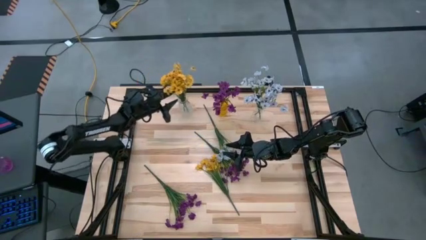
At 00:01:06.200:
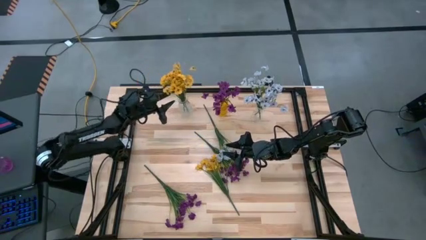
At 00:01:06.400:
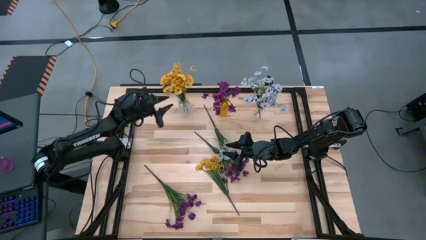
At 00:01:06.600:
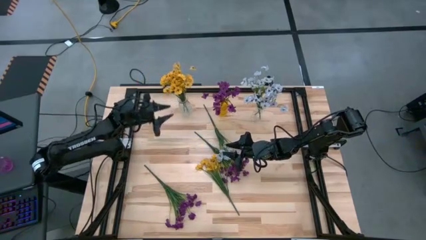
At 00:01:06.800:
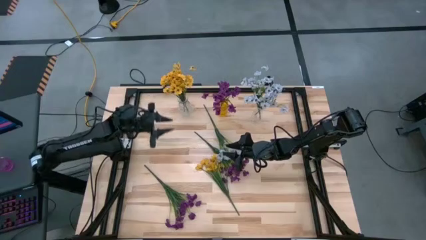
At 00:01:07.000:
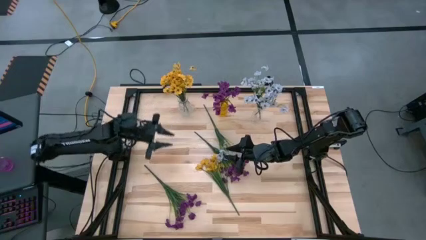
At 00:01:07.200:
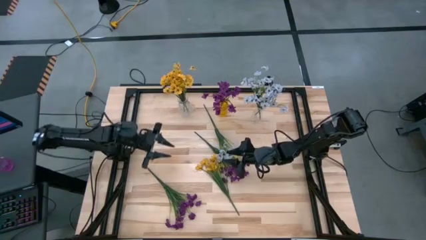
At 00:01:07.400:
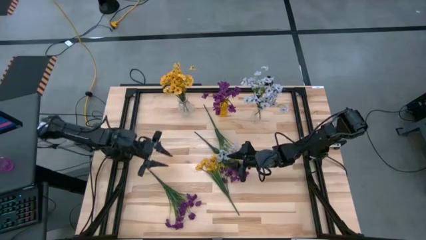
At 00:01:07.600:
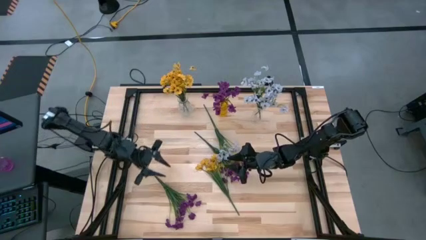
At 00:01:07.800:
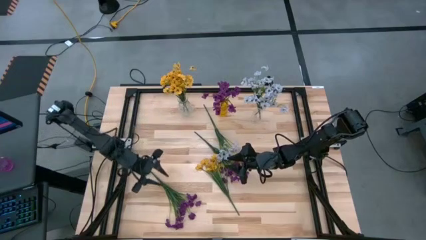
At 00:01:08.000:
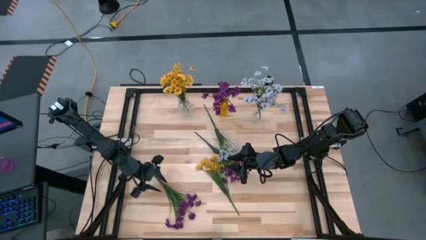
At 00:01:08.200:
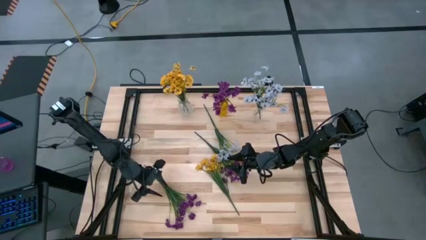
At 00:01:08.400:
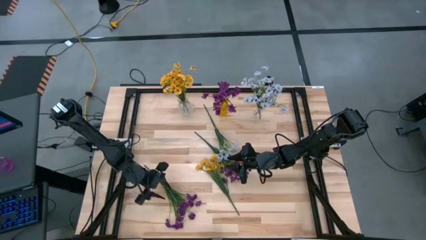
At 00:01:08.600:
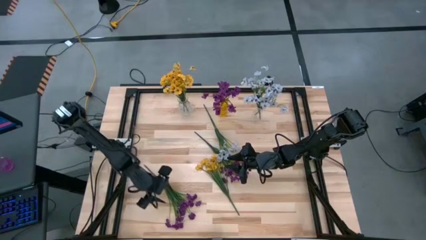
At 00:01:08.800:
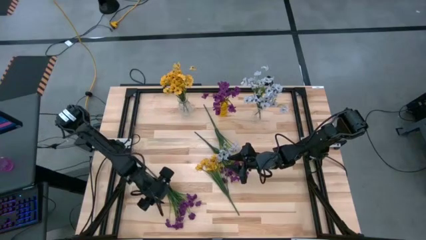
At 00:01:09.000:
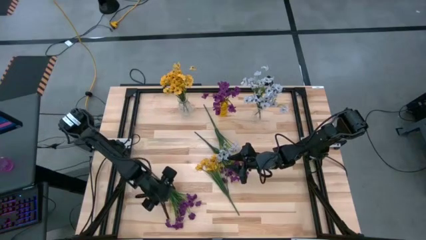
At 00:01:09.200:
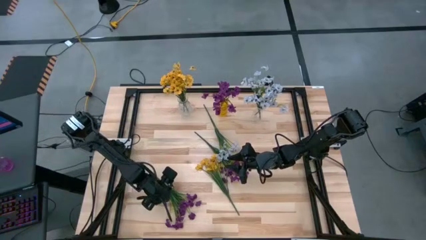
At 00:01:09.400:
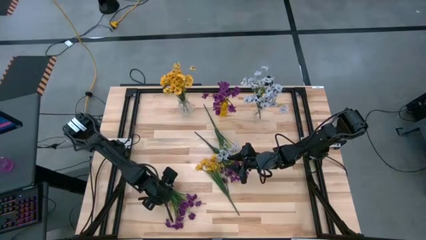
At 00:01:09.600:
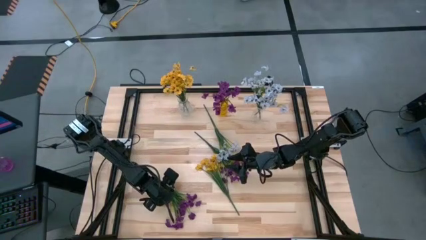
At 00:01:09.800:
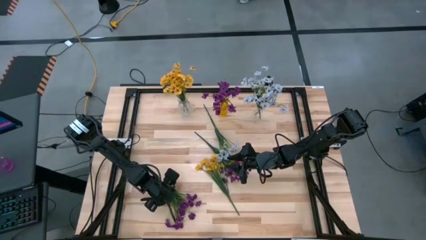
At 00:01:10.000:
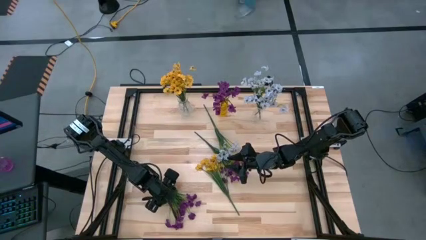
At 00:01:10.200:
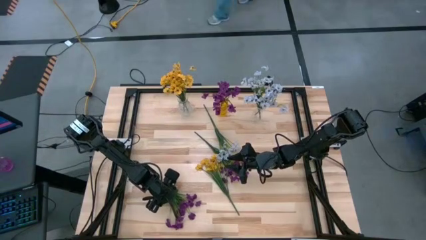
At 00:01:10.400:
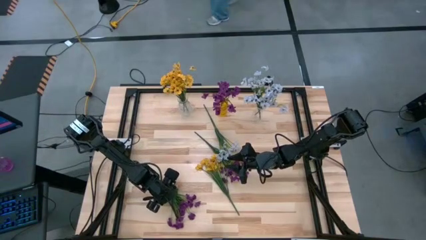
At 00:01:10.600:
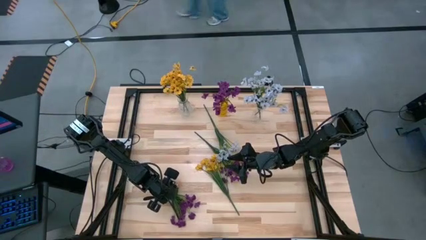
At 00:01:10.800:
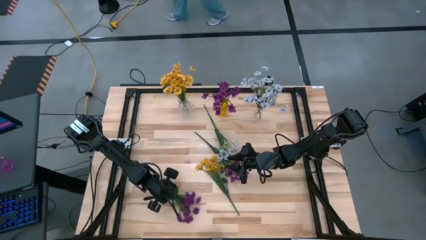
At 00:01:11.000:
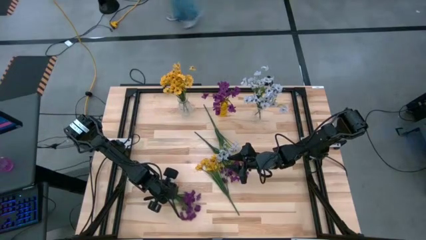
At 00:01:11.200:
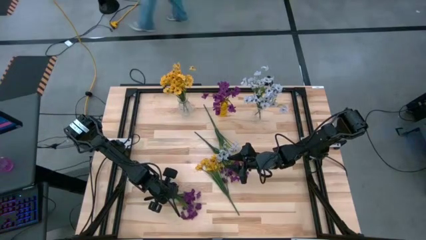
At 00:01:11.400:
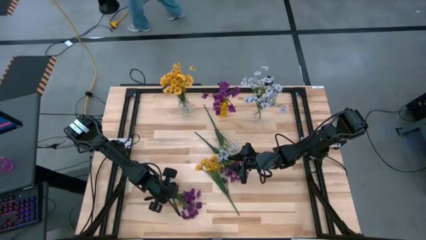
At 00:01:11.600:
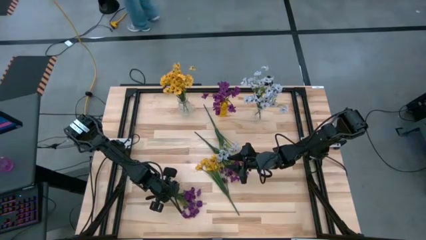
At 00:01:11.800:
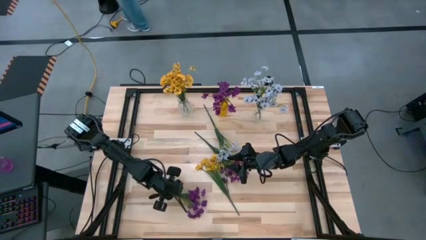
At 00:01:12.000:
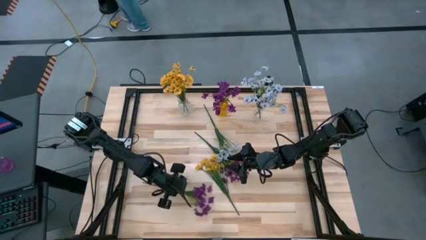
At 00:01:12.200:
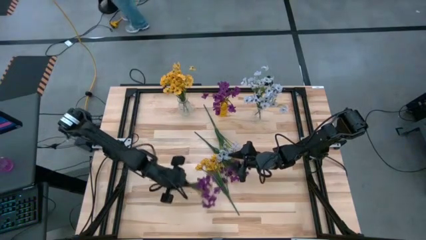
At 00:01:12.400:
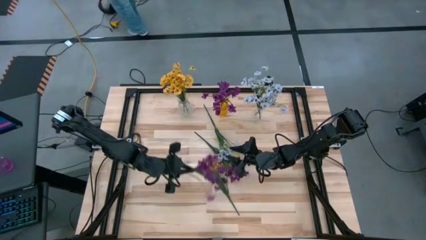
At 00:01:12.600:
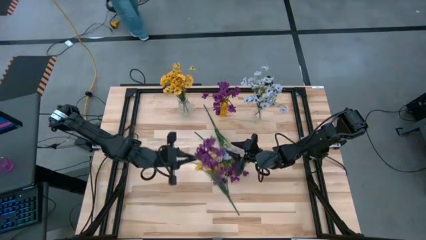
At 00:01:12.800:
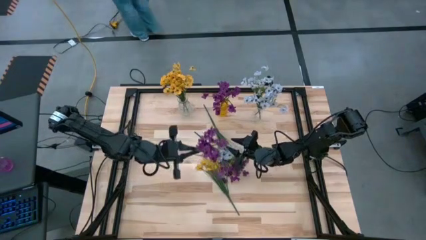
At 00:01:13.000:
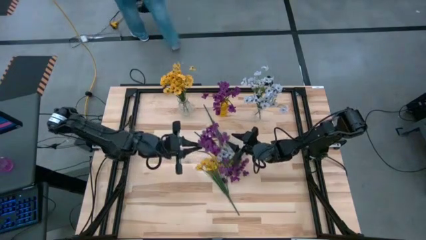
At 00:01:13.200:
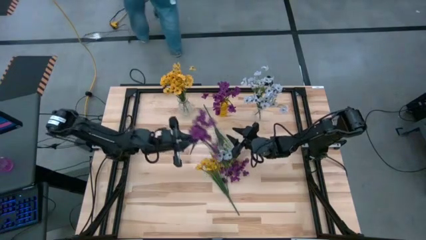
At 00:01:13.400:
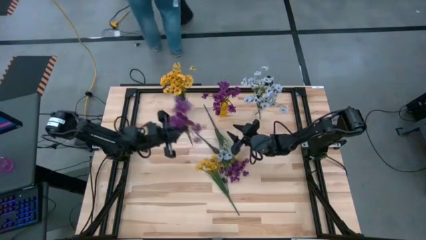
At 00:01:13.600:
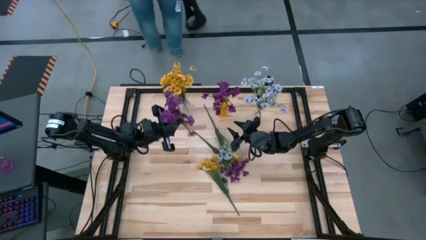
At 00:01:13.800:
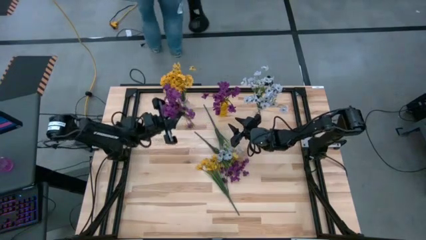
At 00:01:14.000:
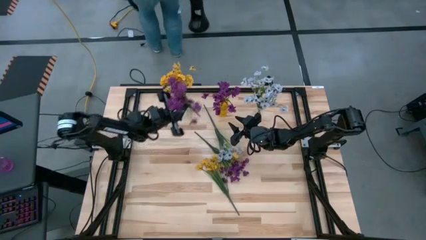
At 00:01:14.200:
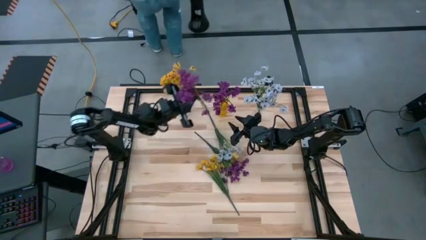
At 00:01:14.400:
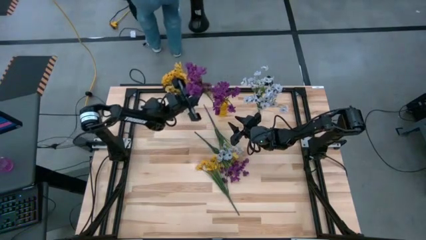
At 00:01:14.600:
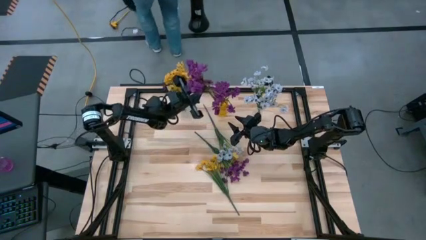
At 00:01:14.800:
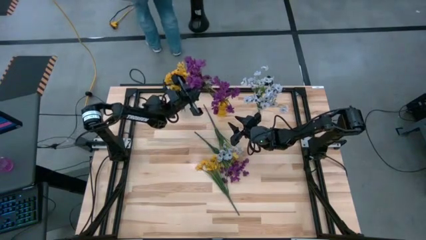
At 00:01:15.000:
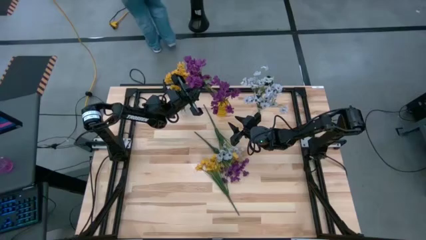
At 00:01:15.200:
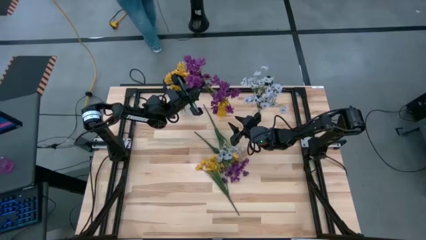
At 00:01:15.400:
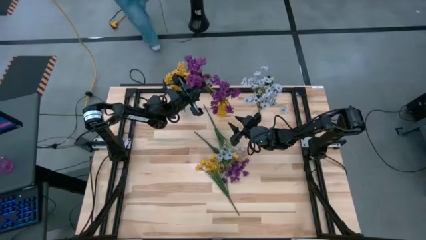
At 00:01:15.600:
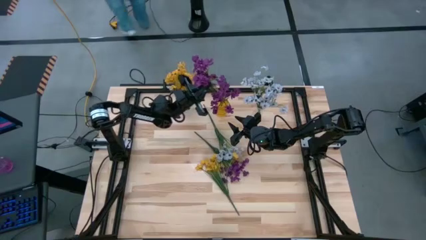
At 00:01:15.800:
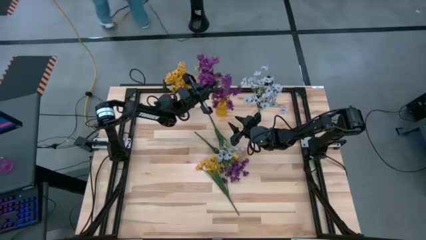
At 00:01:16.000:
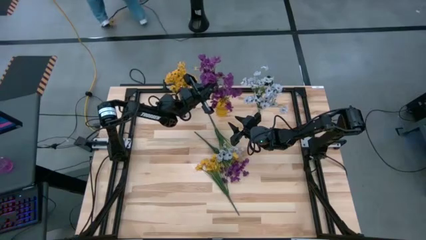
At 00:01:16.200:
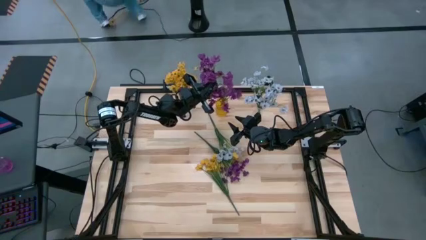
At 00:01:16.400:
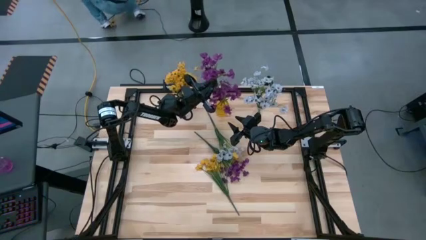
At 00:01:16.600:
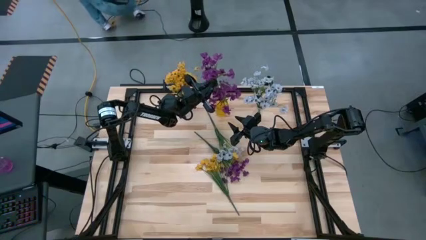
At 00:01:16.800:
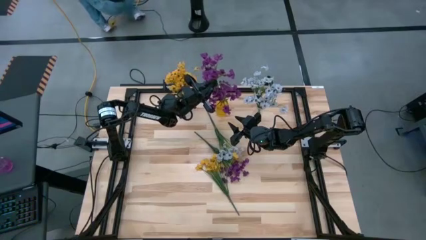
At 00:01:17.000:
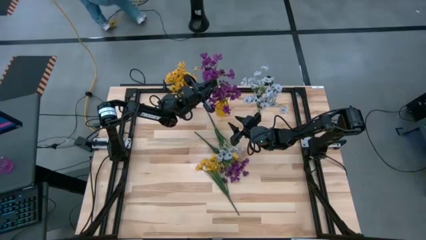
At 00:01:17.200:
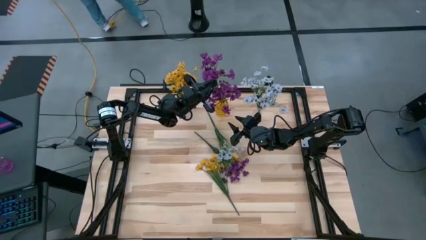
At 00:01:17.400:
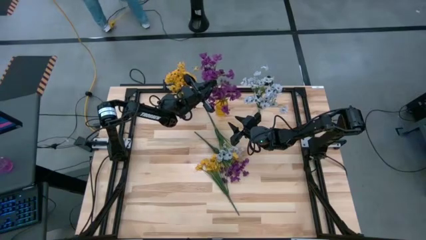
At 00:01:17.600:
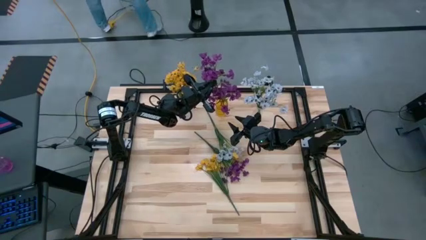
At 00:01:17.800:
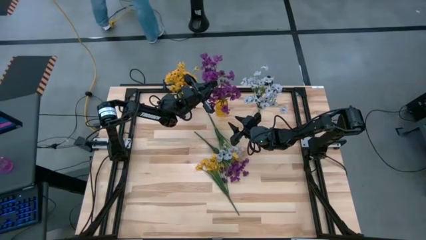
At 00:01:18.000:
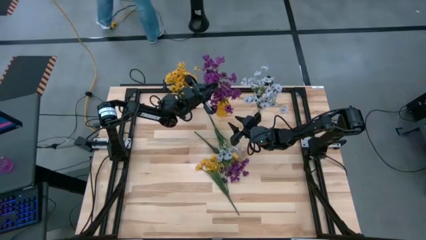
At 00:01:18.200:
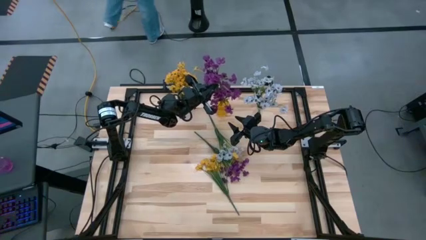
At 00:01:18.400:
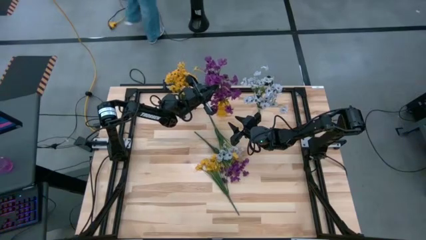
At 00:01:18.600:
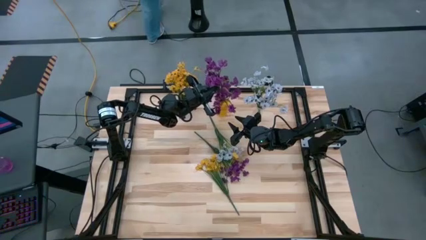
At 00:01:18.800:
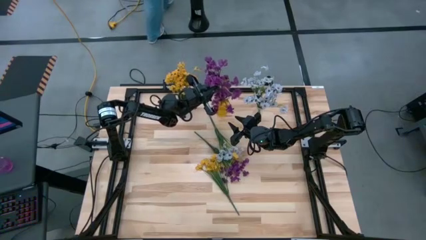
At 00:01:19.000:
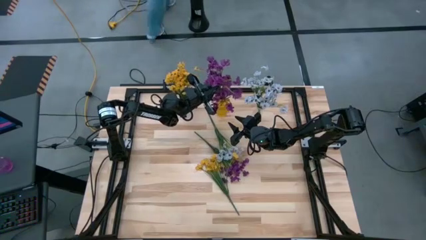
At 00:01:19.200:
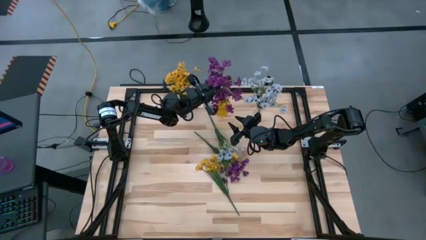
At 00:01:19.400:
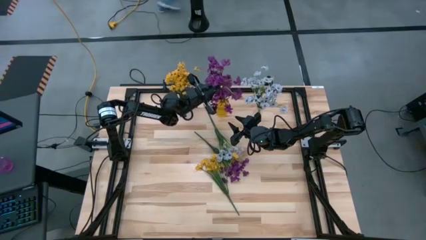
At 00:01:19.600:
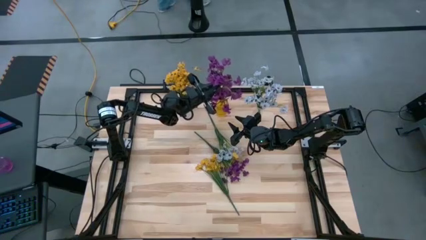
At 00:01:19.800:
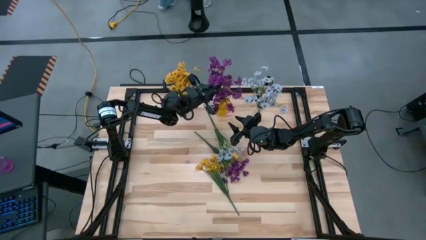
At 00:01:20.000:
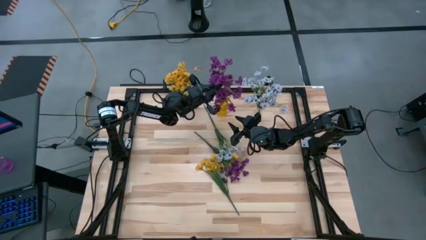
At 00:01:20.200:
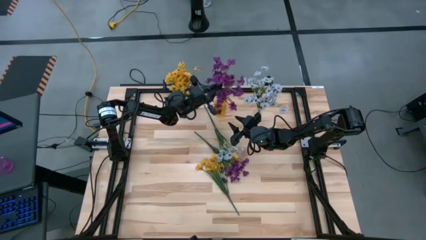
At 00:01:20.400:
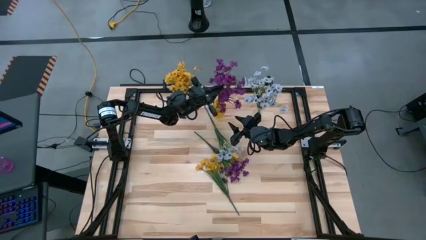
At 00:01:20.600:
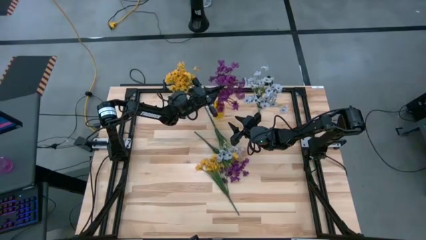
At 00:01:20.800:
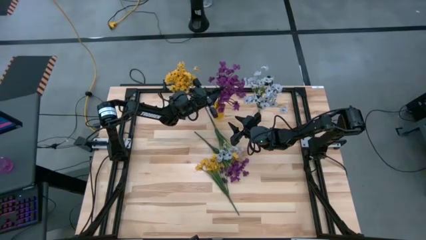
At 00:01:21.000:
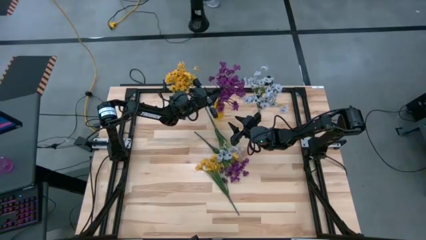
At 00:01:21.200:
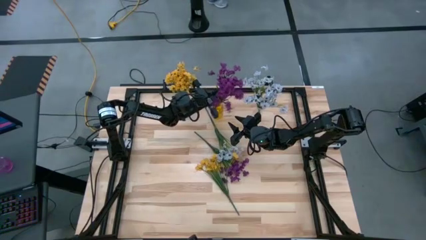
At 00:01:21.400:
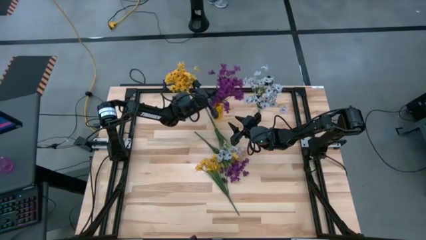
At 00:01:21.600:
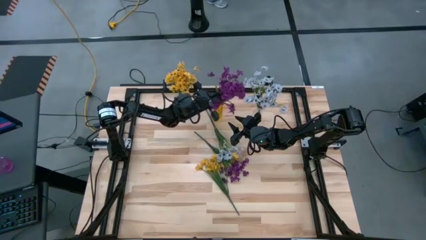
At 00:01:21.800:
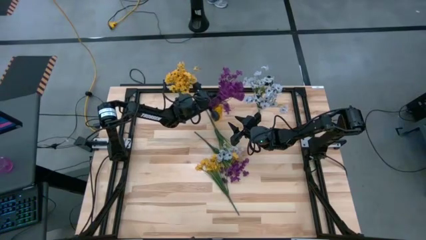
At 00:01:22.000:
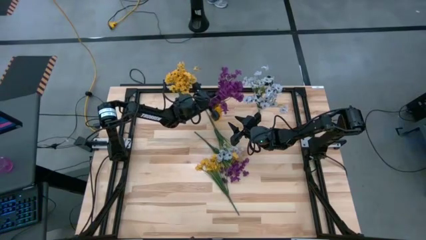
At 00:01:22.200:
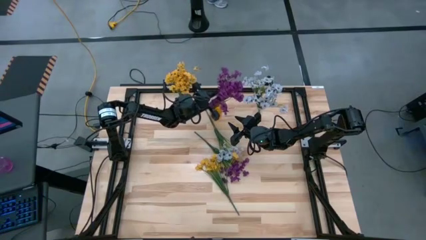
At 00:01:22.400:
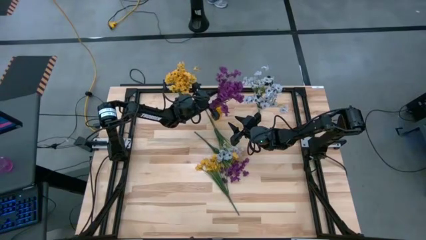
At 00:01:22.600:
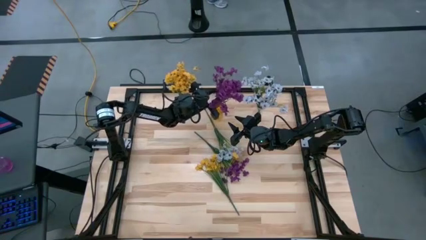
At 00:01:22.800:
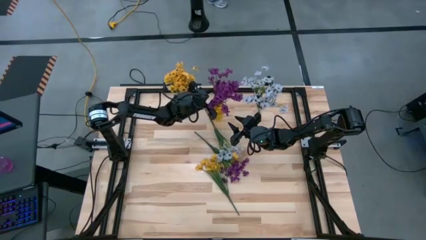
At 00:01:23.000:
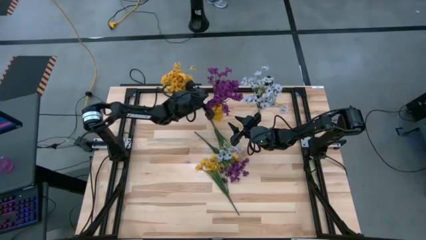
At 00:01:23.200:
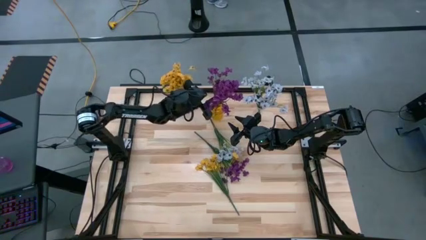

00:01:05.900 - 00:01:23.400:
Task: Sort flowers into vase by color
Put the left purple flowers into the yellow vase
